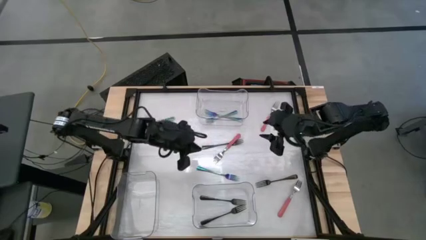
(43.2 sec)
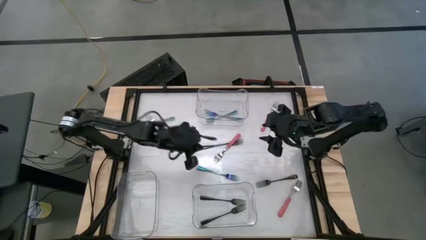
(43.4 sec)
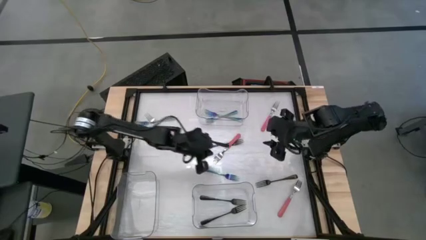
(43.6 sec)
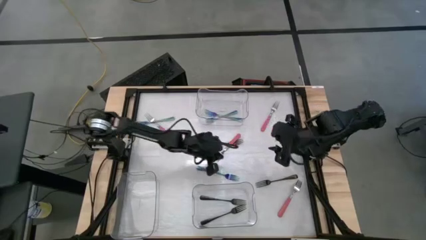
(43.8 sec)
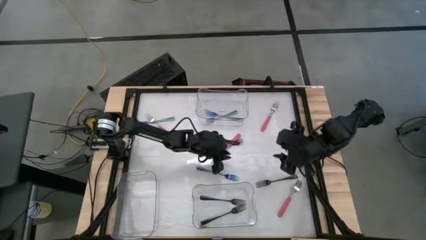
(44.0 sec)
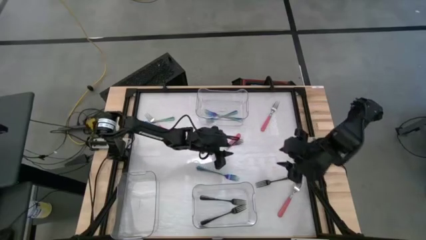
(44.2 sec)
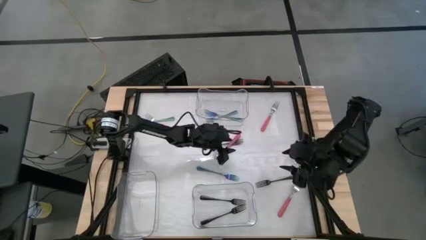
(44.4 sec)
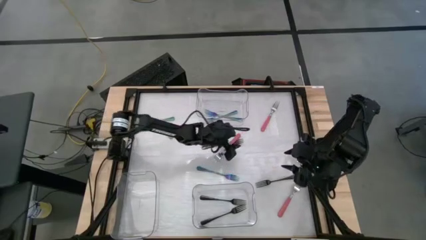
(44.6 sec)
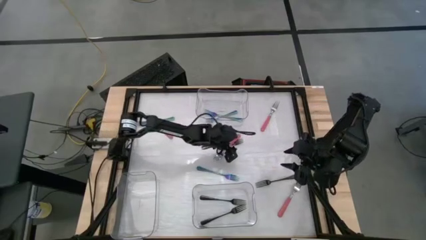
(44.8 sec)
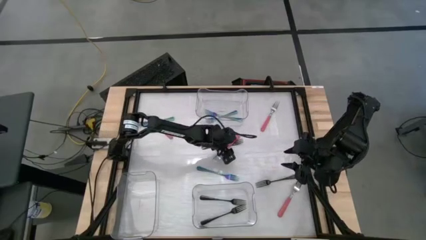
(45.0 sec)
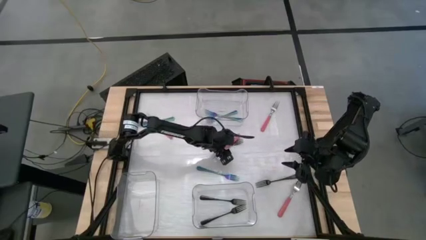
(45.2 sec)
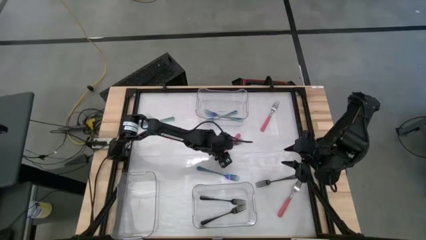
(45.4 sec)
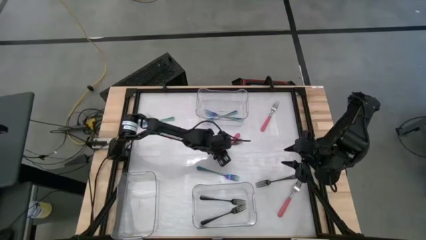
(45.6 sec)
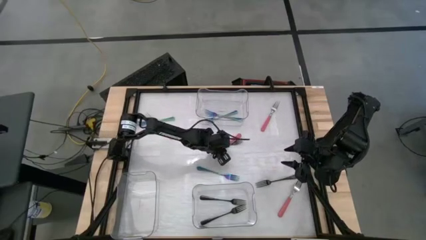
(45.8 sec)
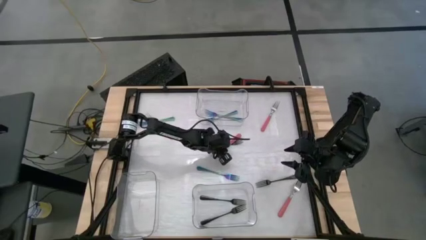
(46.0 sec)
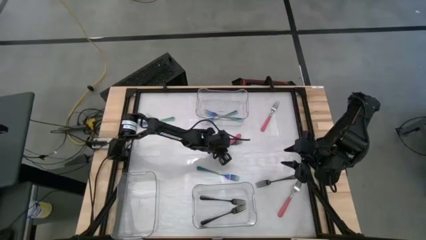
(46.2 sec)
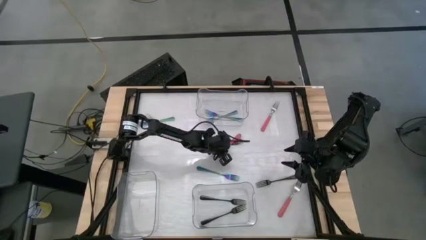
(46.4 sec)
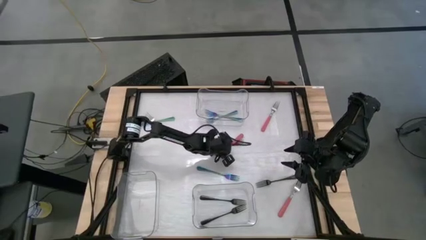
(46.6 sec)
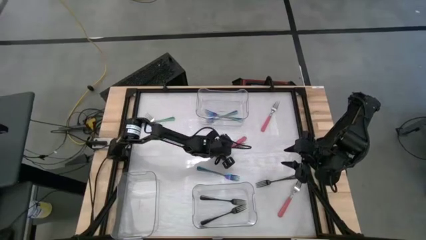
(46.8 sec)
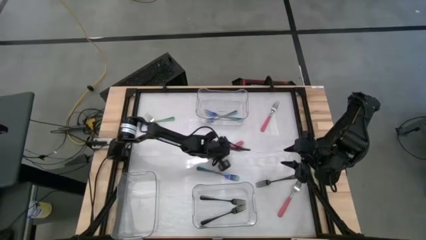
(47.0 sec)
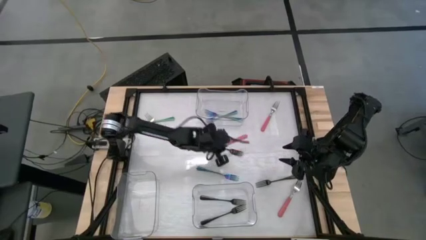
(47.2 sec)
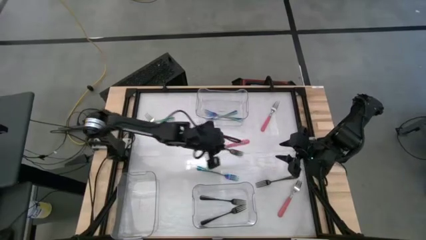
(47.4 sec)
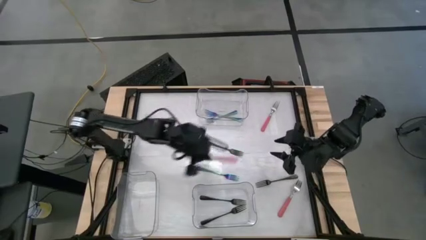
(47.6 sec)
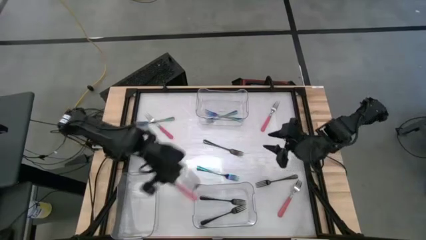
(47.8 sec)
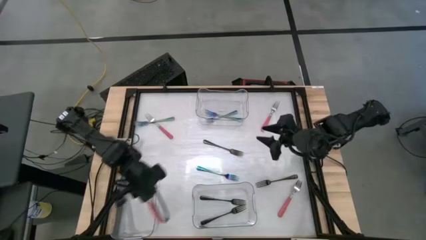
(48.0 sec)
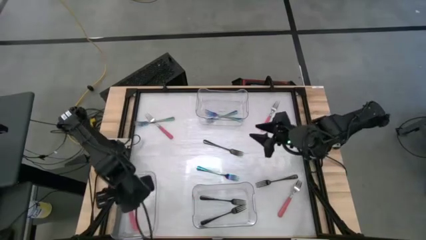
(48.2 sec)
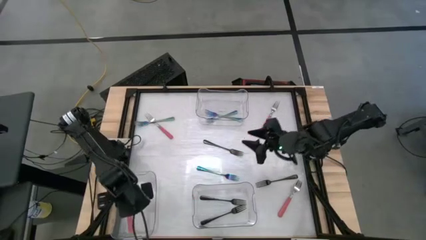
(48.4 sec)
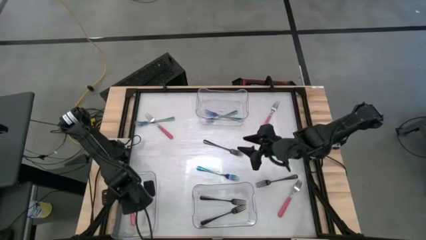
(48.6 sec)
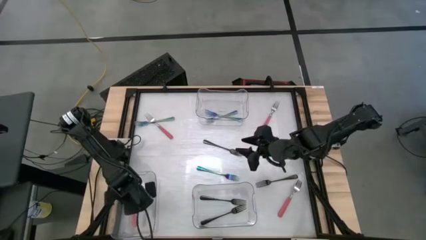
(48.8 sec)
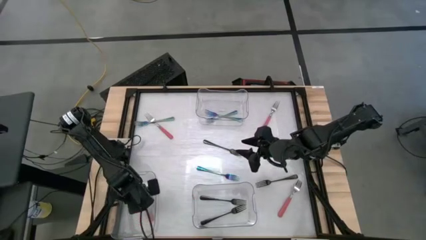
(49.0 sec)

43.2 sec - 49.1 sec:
Task: Sort silverware by color (type)
Put the pink fork into the bottom left transparent bin

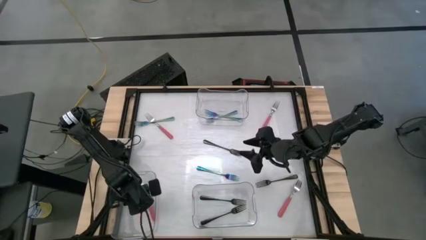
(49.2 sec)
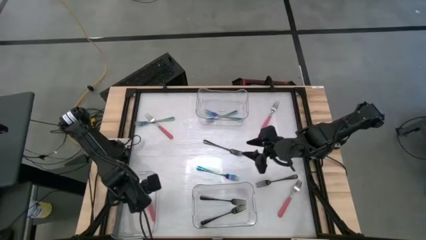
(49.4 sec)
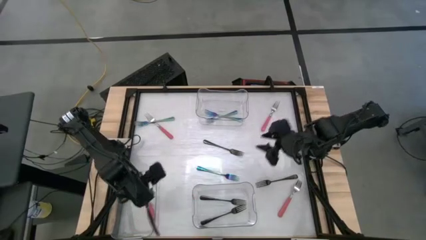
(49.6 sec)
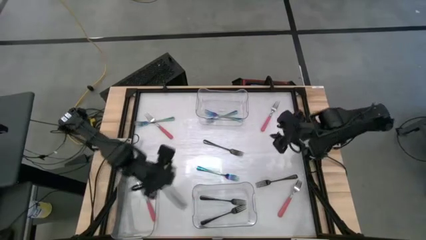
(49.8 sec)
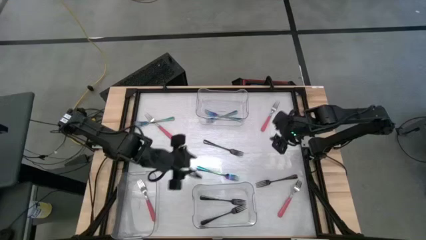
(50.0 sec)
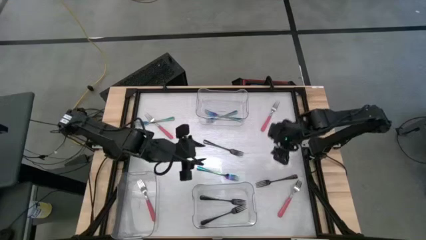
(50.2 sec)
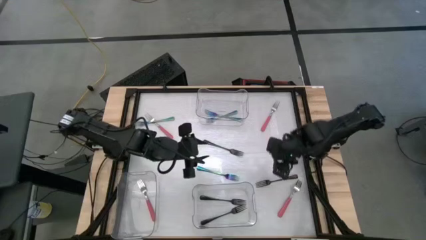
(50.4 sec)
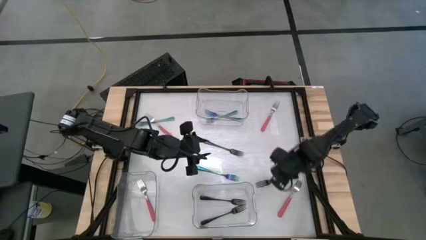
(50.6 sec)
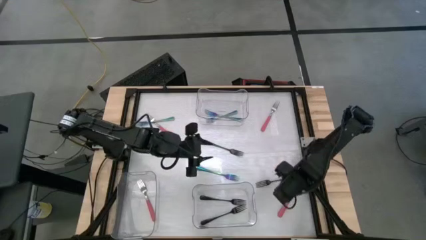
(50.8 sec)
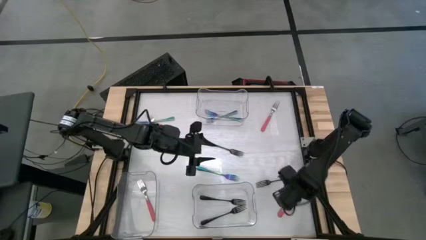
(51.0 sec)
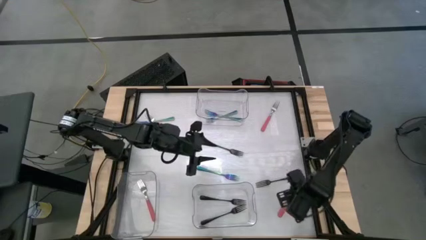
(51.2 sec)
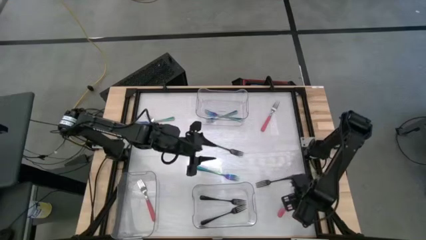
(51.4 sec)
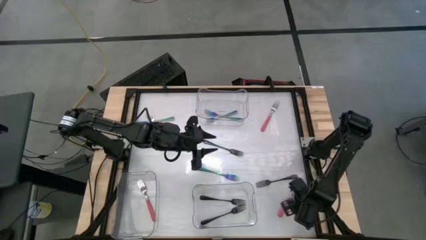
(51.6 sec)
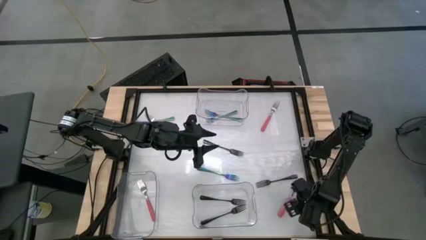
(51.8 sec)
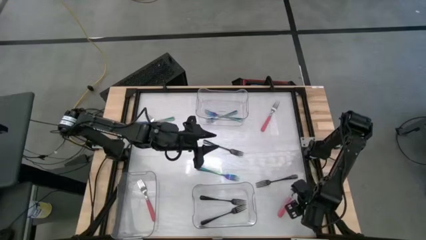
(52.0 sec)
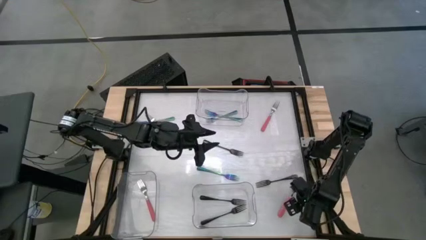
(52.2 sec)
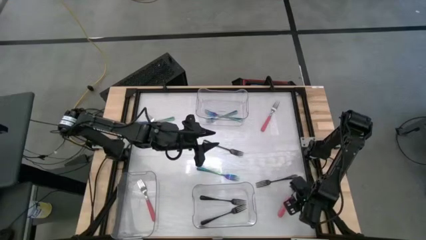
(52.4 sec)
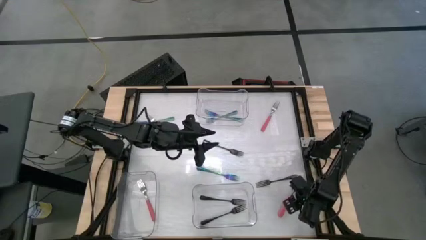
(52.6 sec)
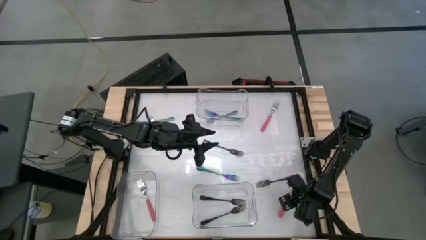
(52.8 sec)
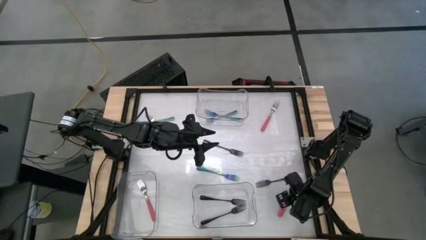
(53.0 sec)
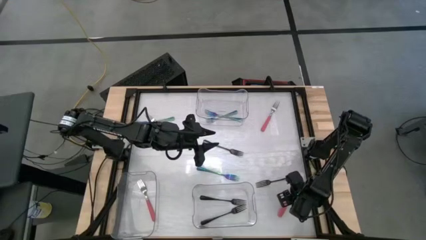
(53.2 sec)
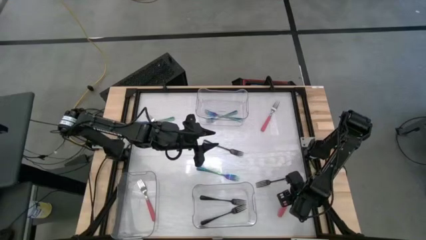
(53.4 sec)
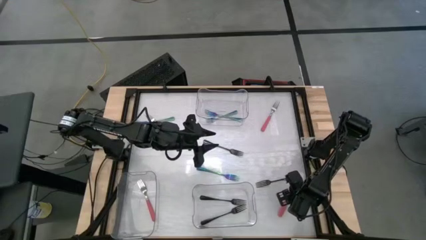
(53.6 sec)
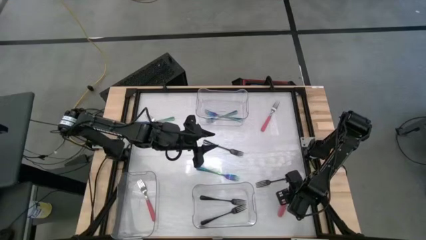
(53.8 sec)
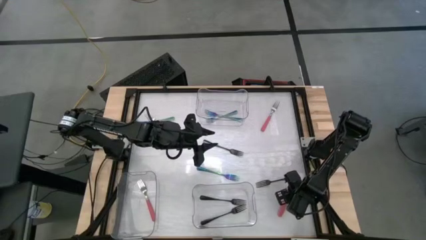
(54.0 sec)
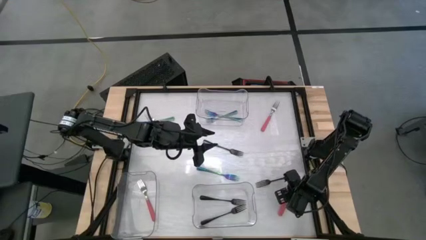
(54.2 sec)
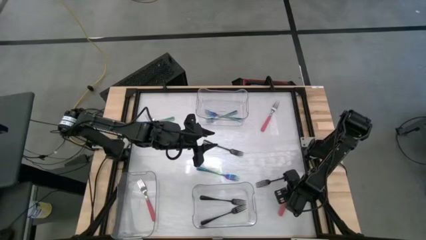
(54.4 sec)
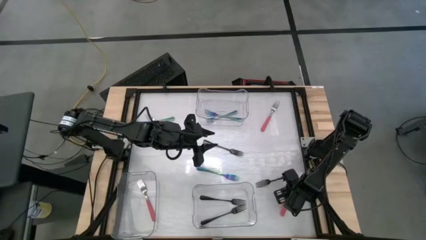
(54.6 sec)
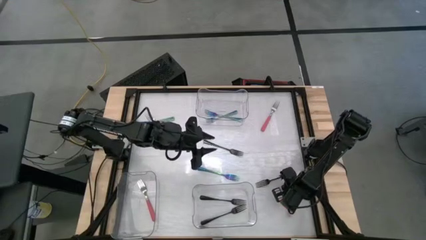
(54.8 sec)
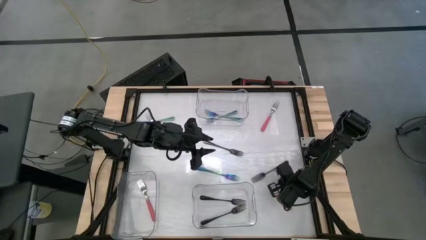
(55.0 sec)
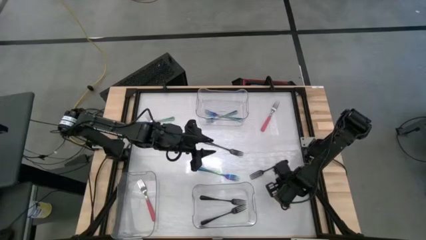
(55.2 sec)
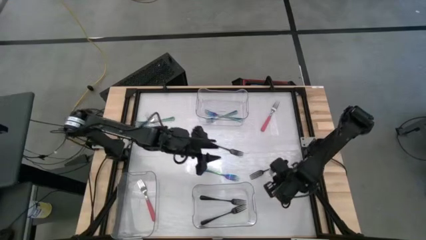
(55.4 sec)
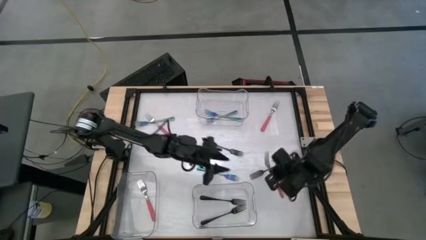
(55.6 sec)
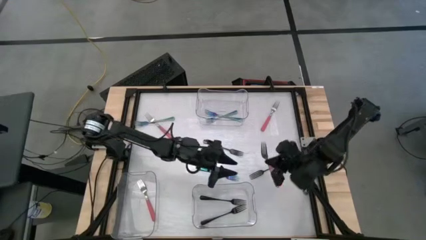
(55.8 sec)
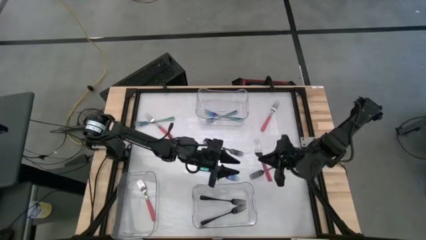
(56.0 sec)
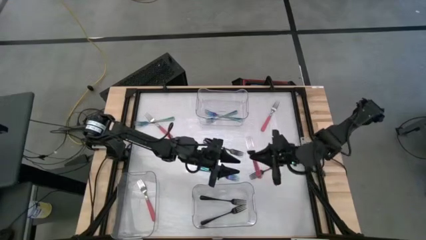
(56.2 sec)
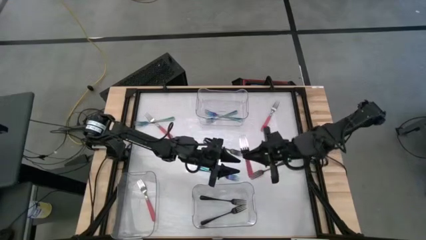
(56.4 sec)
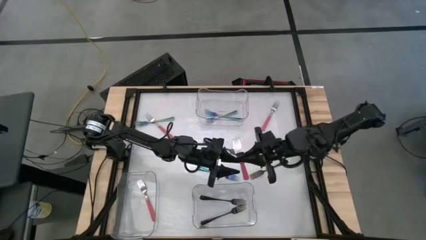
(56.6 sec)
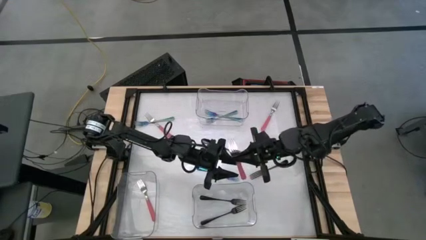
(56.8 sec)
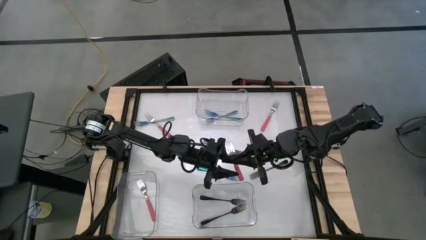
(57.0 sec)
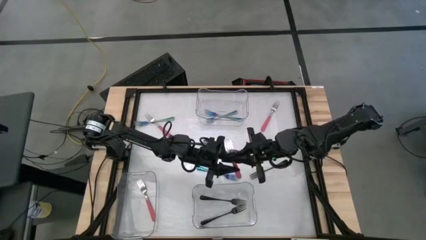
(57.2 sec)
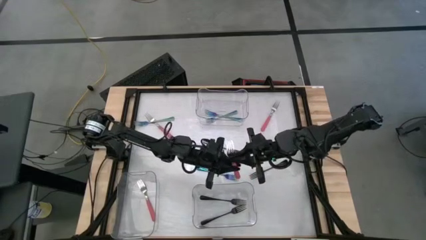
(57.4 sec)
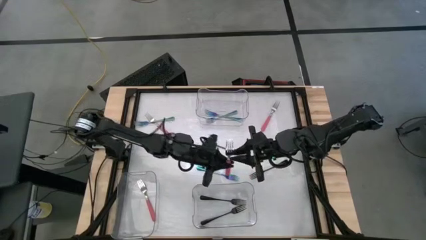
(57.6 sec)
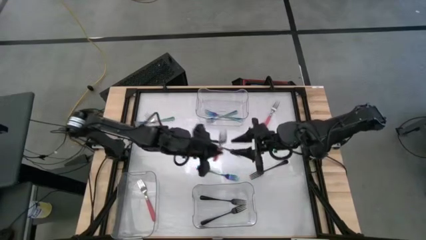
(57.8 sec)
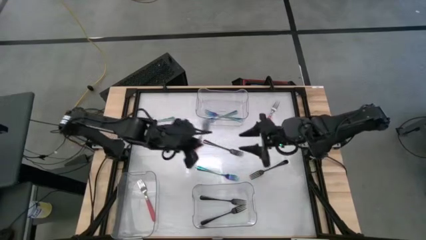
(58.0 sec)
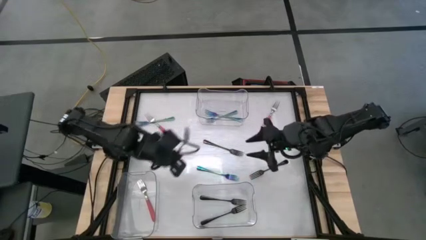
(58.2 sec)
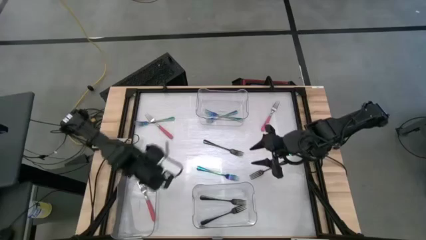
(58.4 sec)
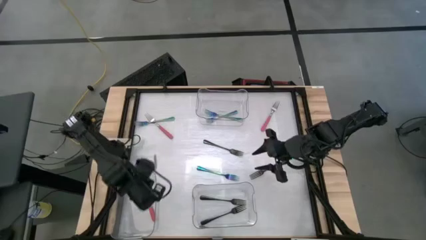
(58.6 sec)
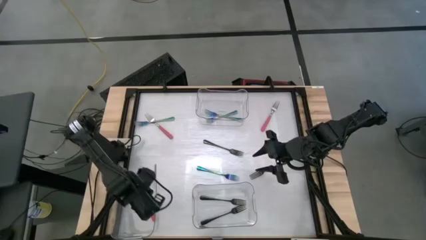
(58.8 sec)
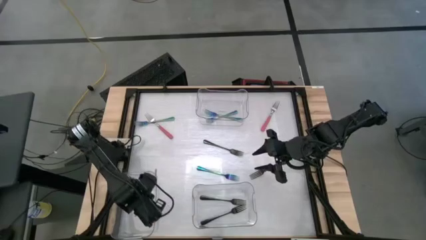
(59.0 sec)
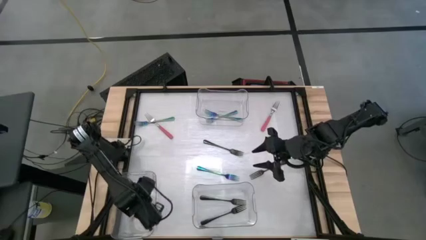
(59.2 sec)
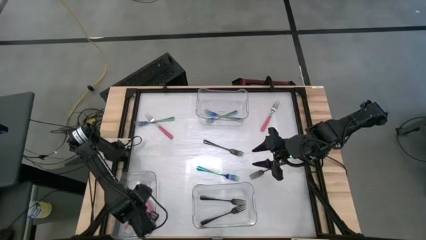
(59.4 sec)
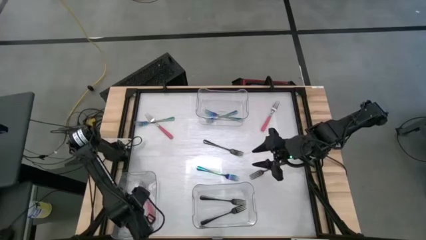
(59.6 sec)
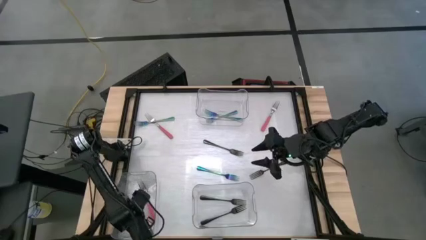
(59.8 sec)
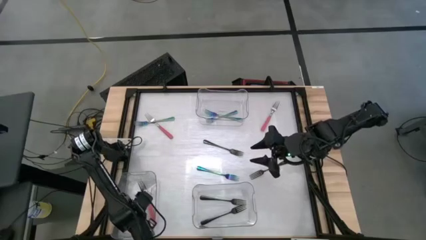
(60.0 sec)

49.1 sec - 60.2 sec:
Put the pink fork into the bottom left transparent bin
